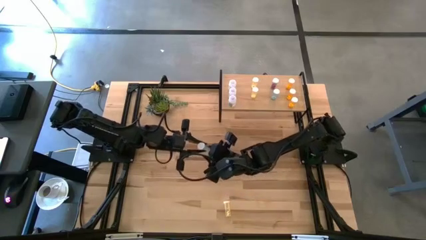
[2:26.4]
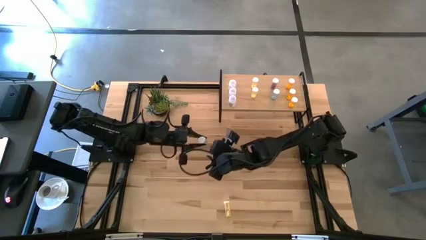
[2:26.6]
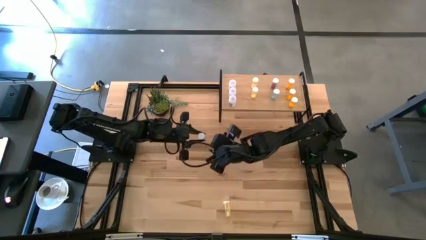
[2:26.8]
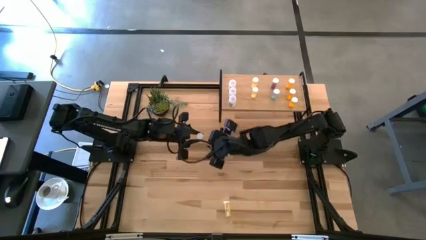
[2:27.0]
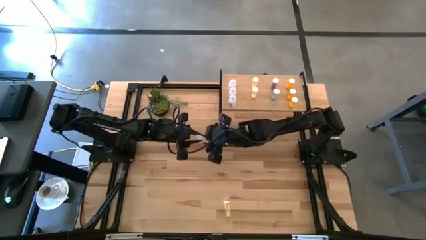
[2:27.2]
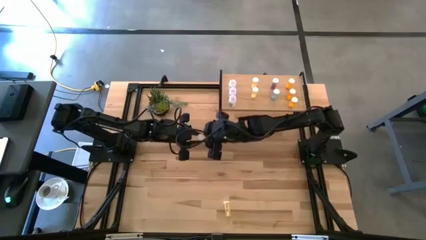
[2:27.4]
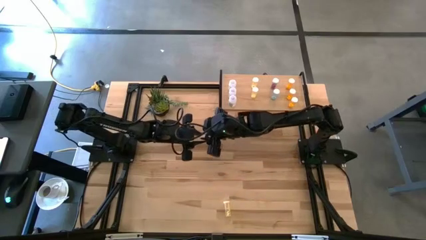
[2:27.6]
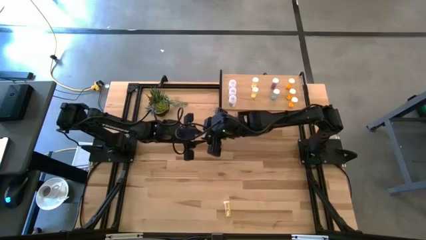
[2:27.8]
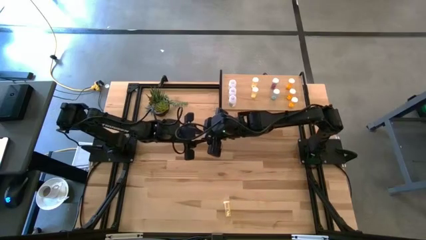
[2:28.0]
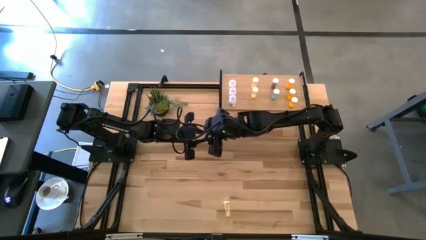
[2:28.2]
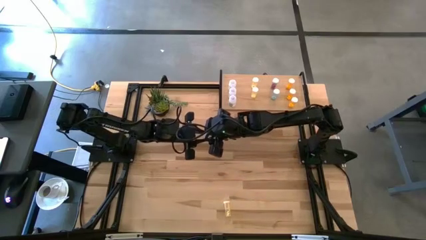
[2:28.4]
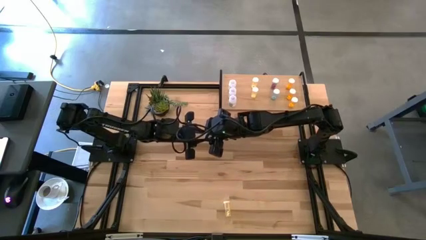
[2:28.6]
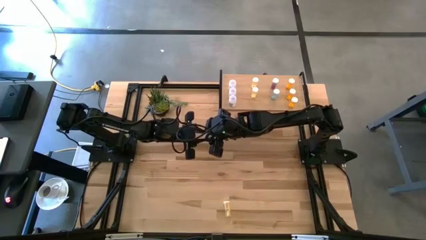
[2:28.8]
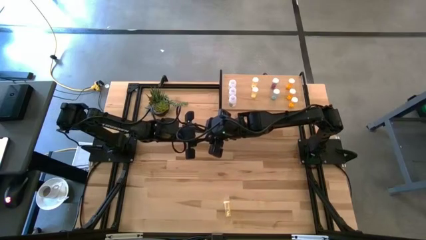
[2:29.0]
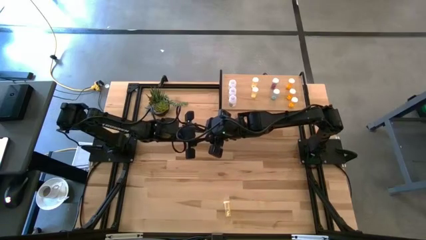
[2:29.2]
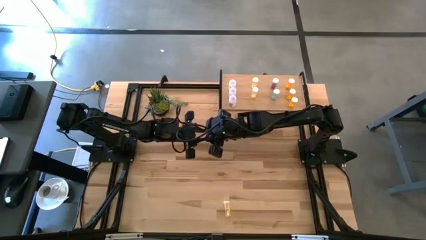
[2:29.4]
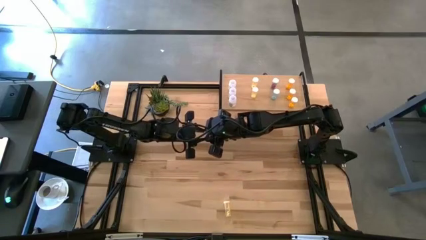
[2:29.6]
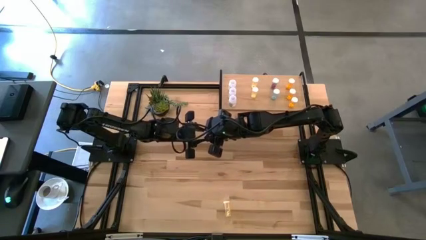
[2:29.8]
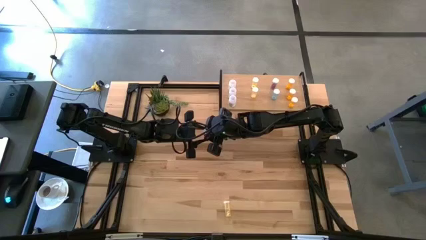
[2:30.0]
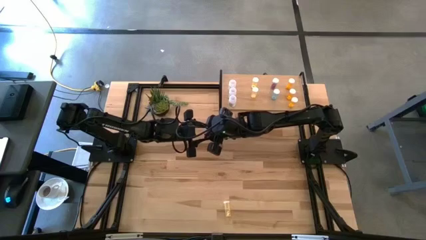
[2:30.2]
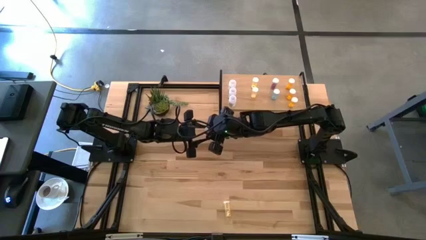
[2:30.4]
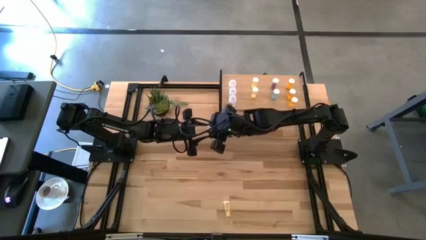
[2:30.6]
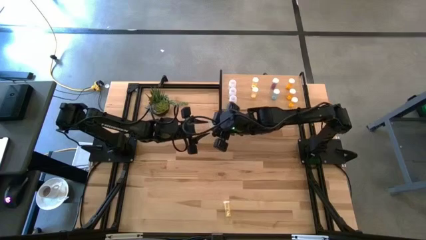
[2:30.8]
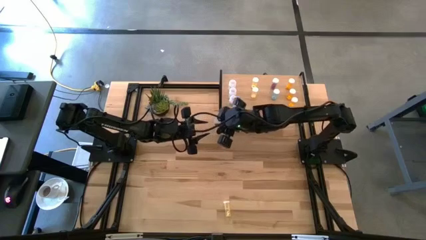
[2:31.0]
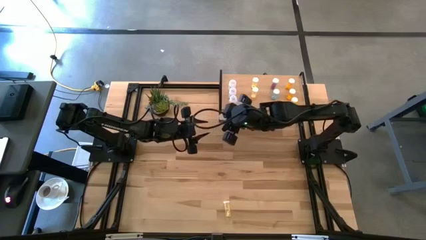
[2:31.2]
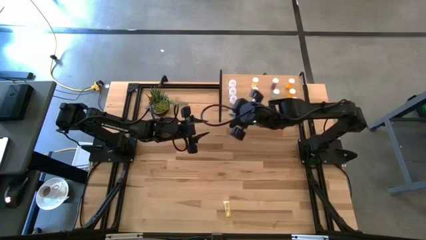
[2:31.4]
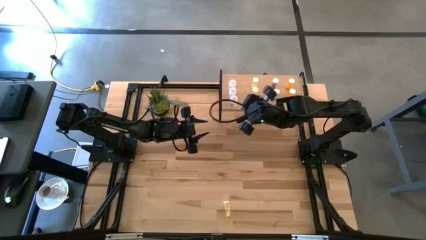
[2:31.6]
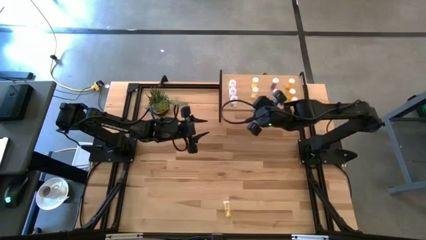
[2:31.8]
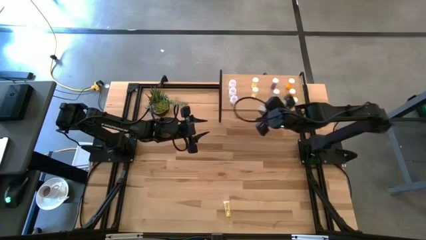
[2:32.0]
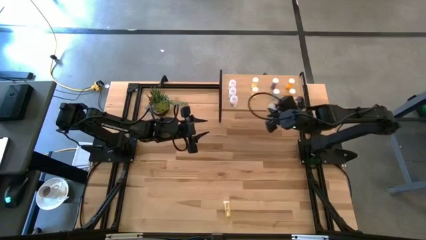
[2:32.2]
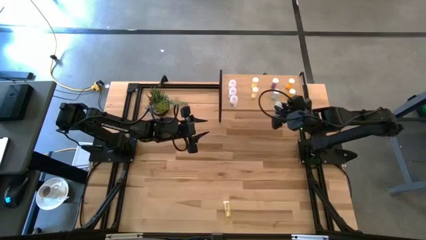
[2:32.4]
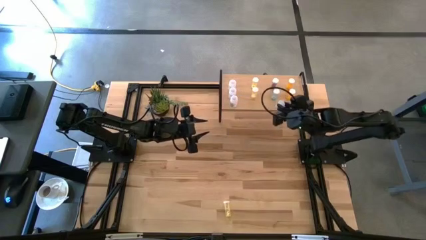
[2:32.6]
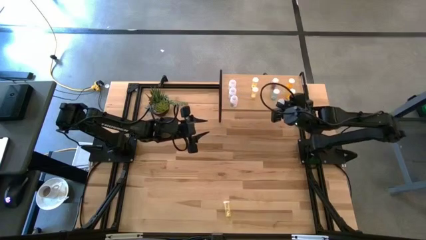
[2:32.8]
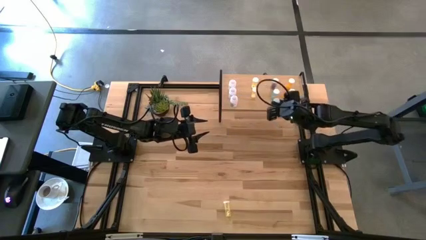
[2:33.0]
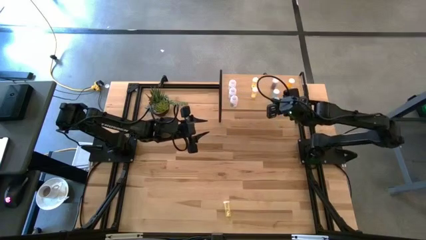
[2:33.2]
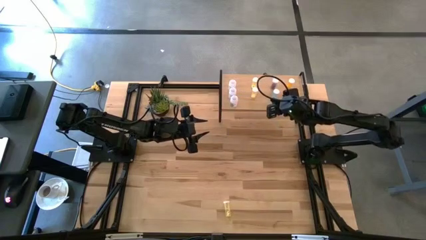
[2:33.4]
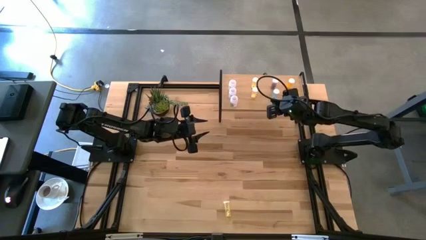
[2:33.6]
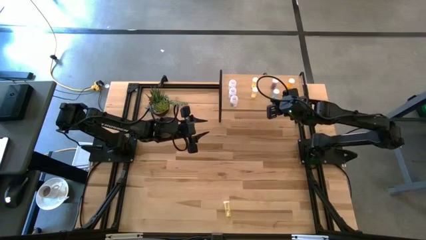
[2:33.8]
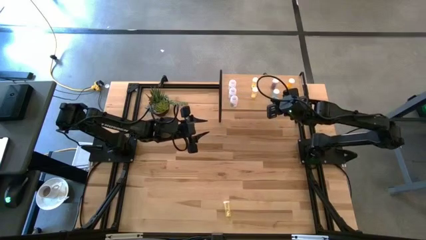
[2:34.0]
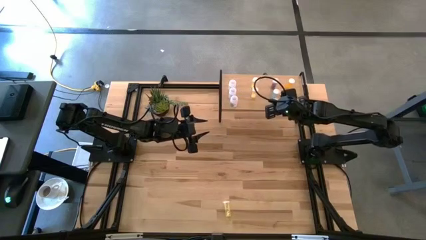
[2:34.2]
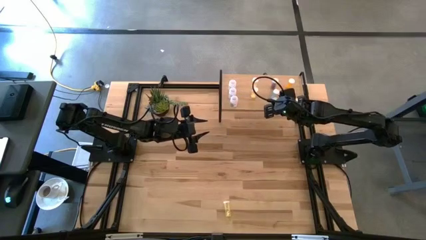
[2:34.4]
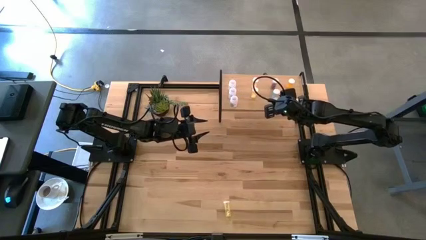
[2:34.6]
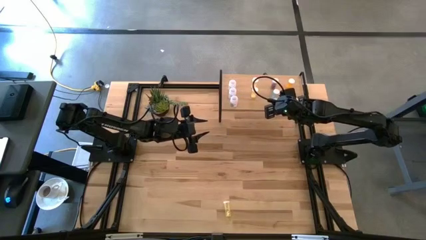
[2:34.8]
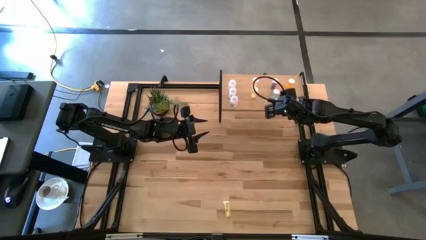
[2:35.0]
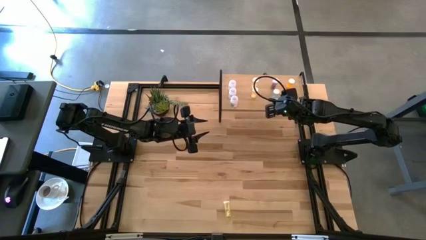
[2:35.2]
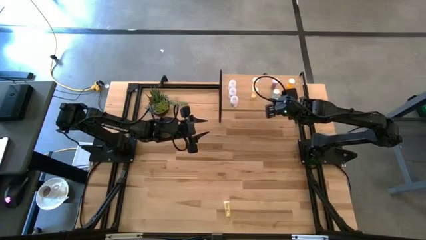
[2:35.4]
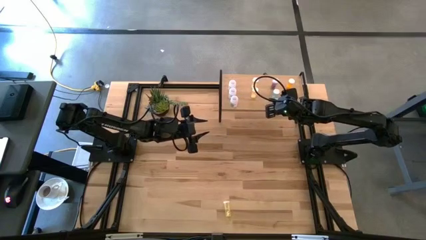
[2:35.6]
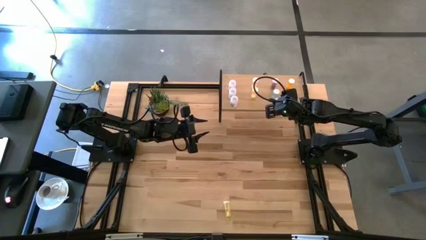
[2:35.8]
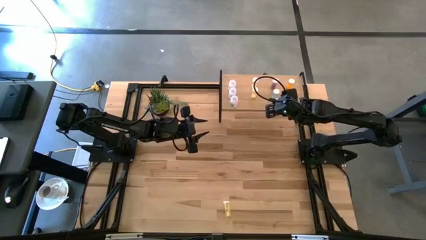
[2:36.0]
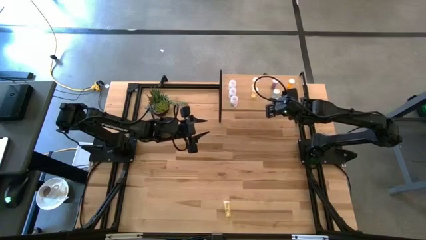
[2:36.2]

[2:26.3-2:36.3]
Task: Pick and place medicine bottles onto shelf by color
Put the blue pill bottle aligned with the other blue pill bottles on the shelf

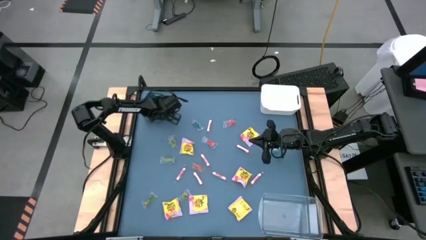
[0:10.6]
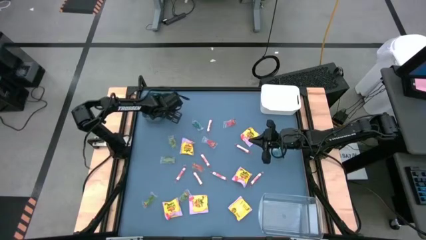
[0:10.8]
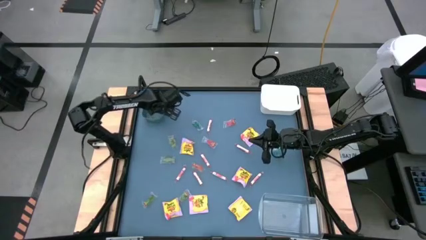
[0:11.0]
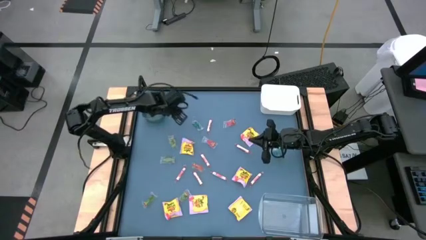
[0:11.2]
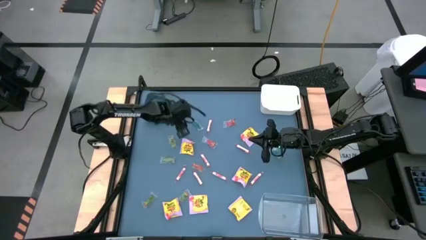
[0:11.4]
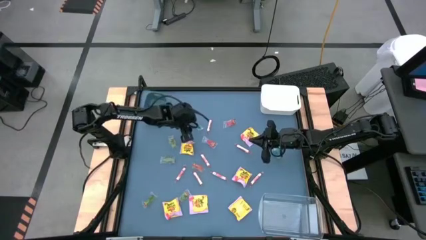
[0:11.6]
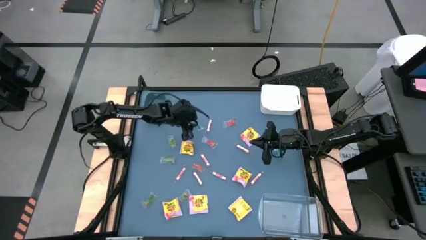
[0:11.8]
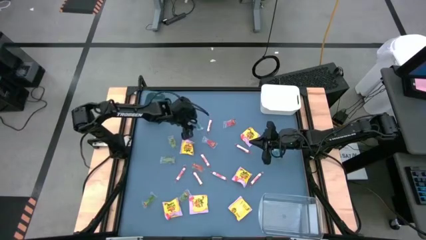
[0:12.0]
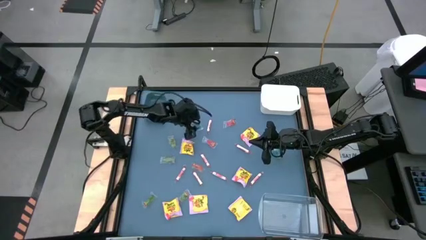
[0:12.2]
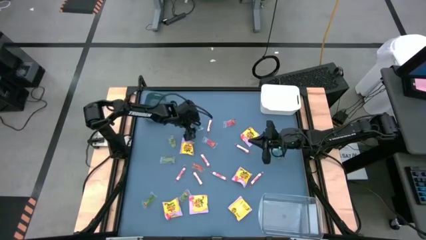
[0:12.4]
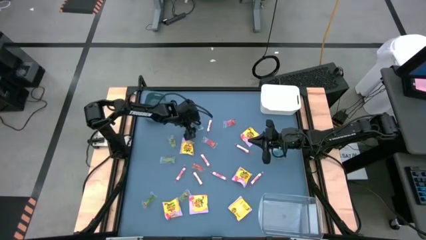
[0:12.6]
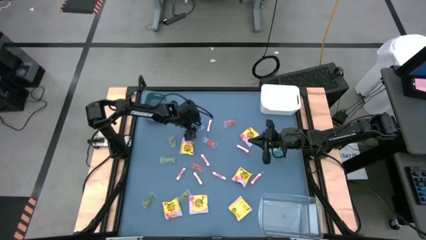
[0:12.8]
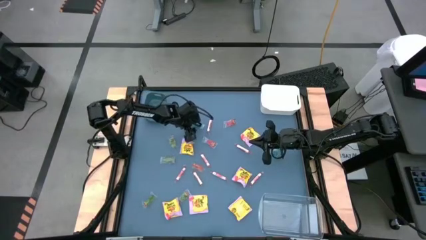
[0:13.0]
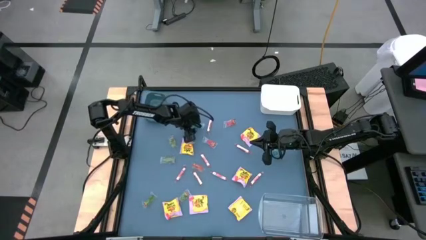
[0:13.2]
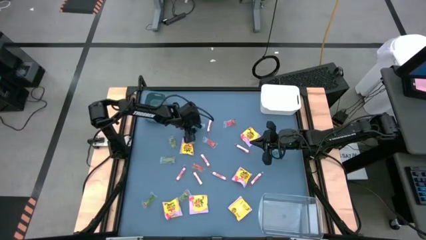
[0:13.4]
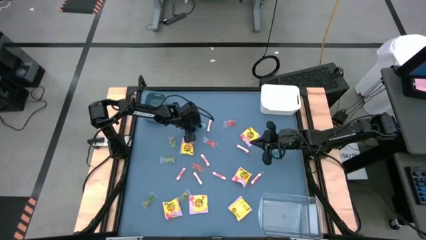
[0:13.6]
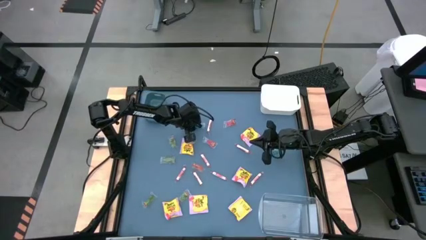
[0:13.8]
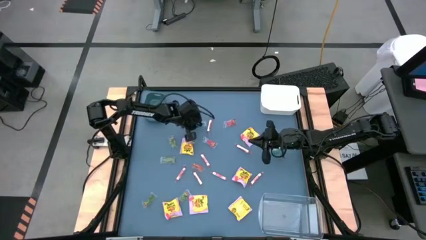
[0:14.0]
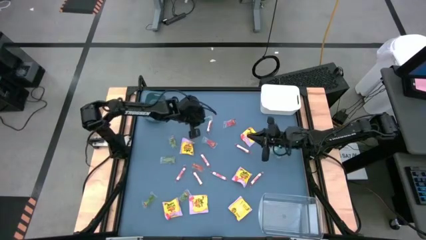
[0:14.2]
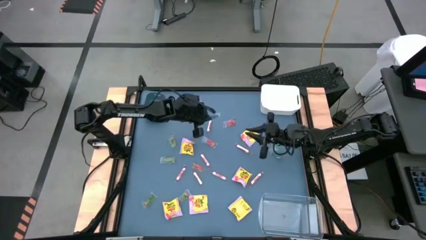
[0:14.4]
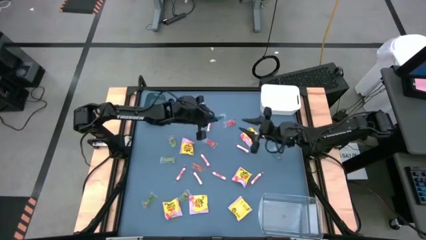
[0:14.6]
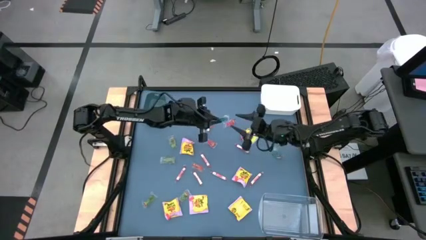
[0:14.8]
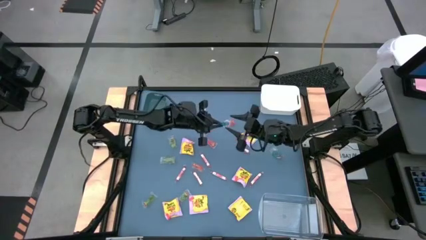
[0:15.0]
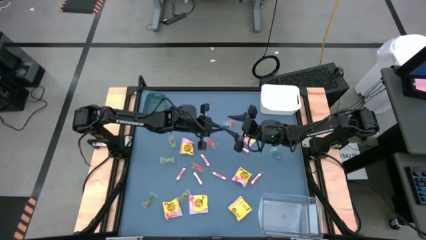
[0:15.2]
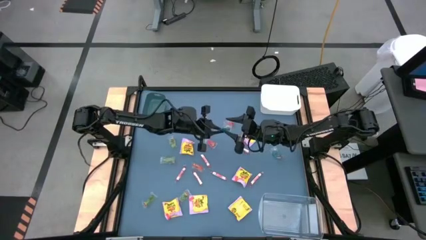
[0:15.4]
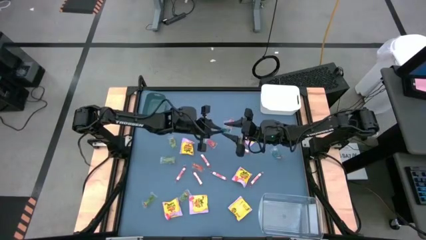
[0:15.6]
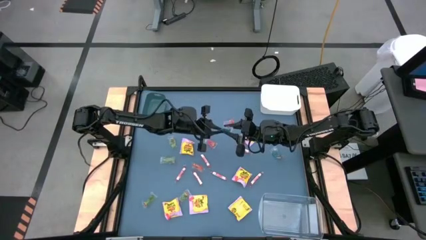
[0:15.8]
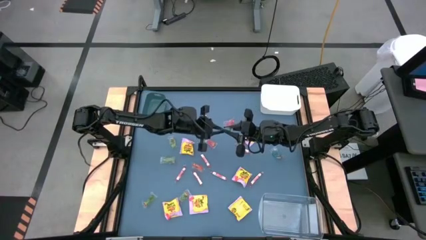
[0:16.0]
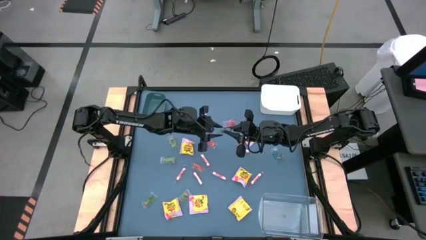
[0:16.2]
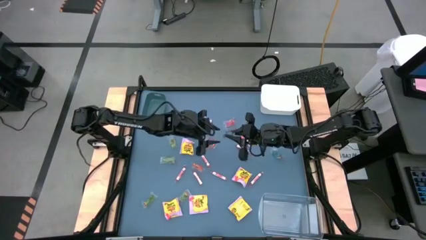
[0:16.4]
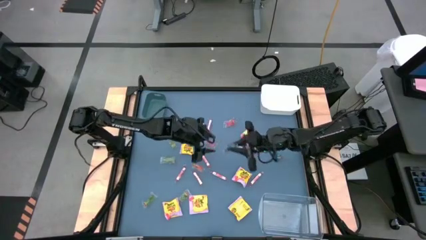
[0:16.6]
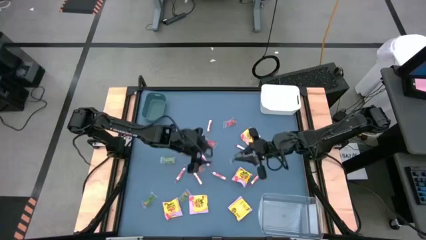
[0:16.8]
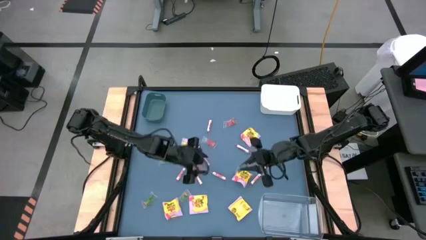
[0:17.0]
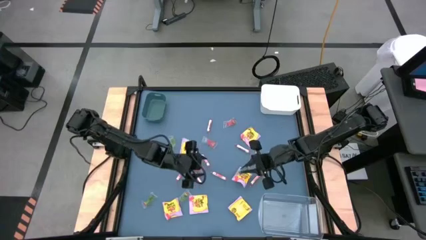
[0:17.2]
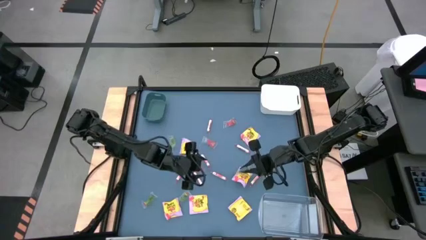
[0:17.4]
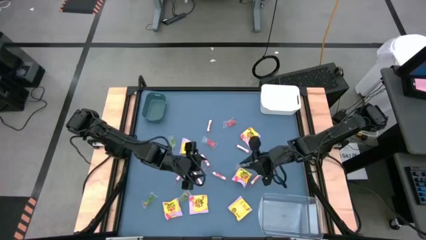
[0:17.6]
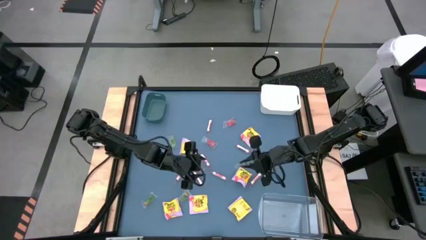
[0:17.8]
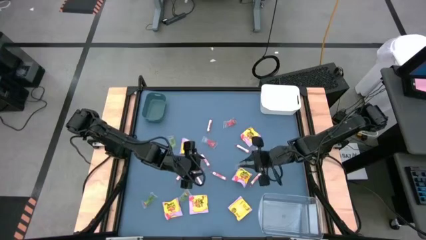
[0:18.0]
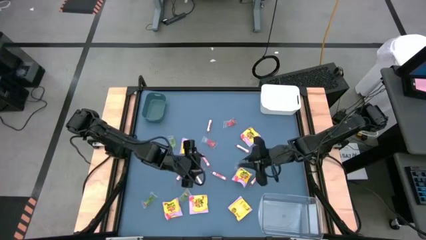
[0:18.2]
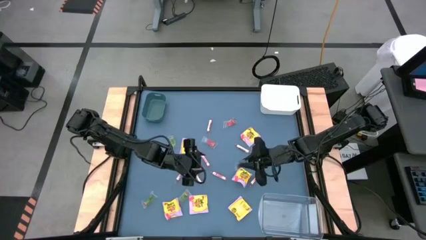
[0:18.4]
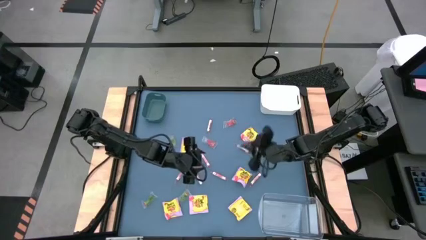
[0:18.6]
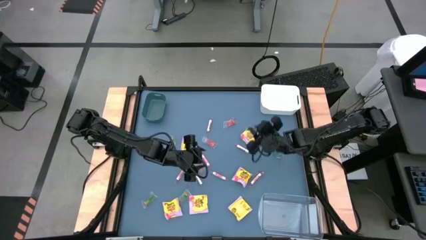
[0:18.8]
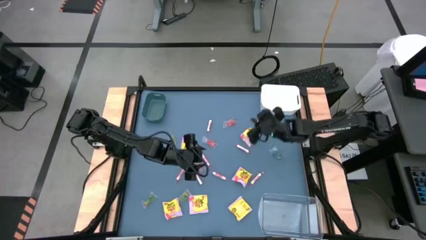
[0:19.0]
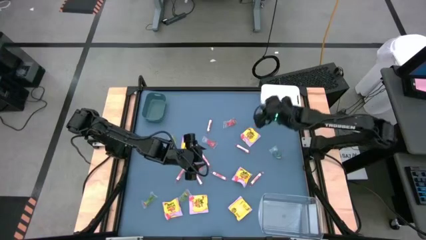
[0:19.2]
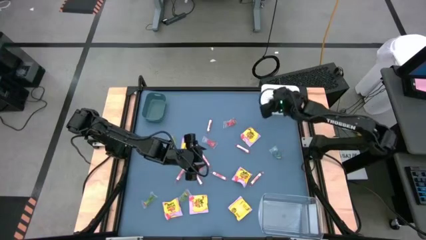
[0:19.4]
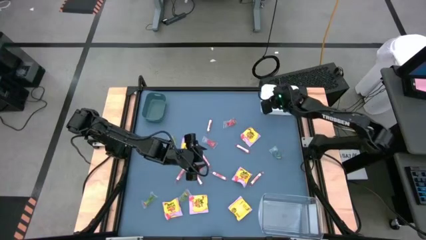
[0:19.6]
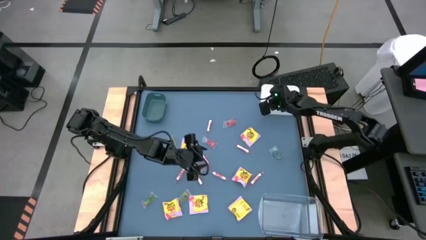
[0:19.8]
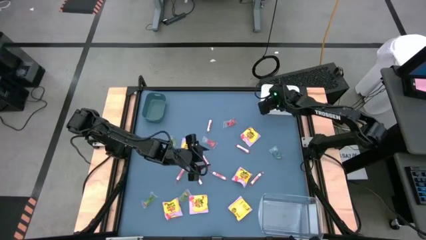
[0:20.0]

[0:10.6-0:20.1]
Task: Sort candy
Put the blue gummy into the white bin
